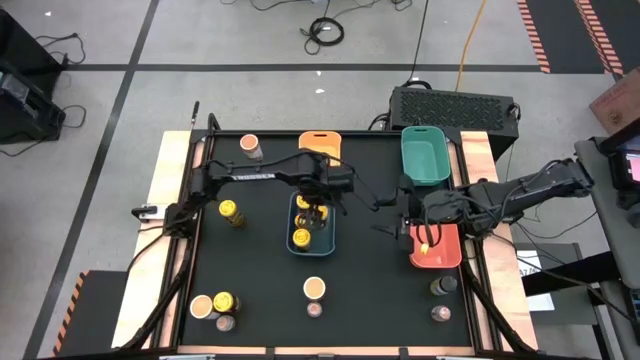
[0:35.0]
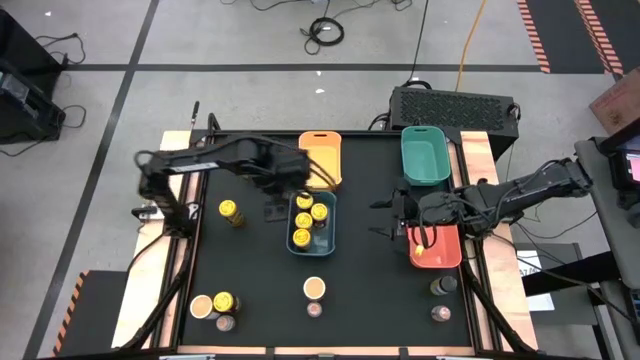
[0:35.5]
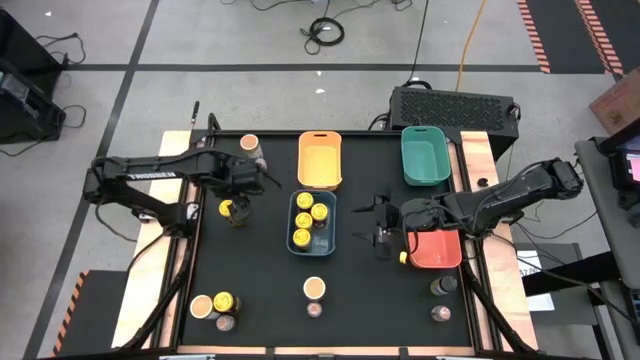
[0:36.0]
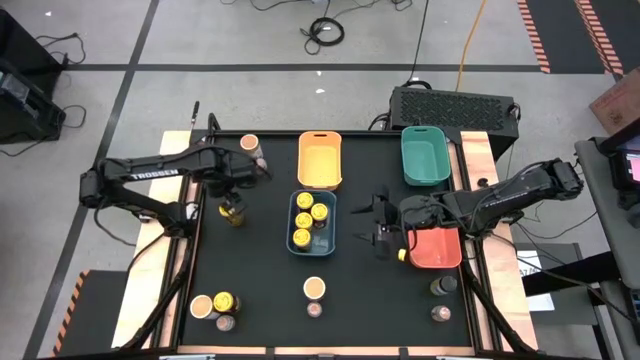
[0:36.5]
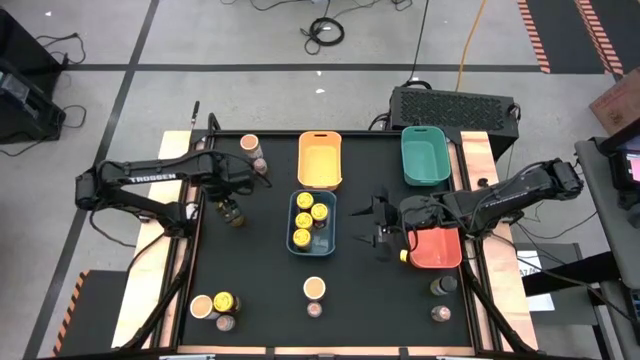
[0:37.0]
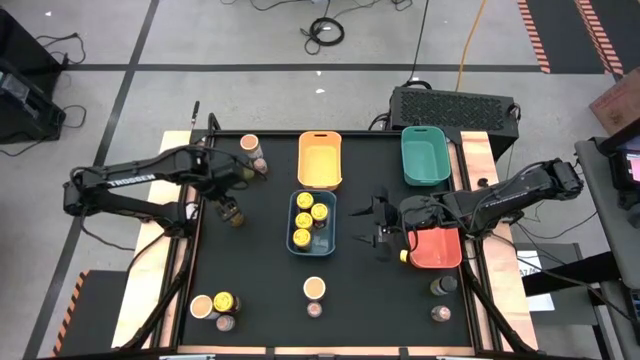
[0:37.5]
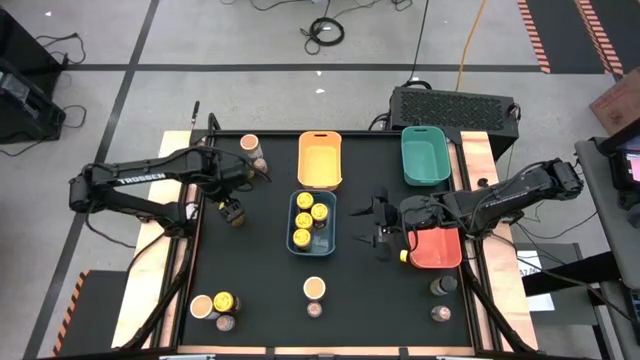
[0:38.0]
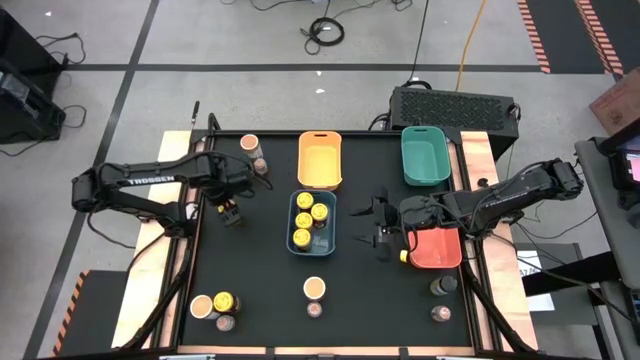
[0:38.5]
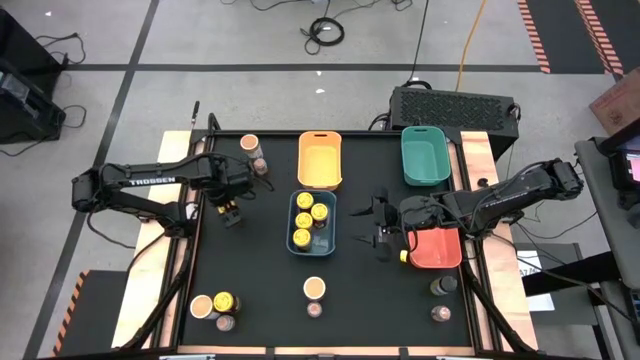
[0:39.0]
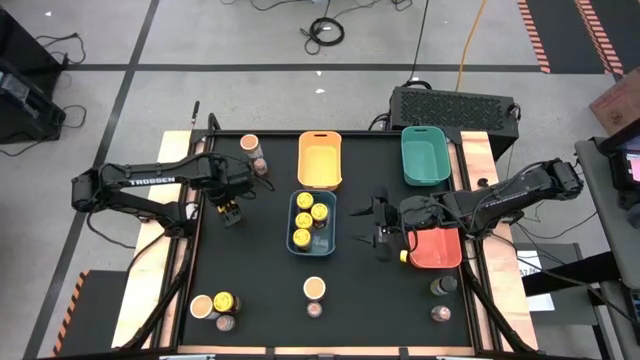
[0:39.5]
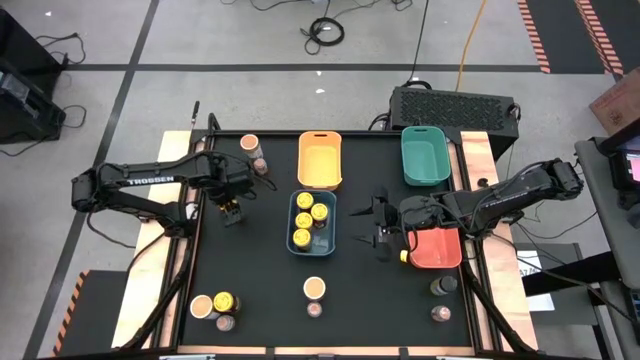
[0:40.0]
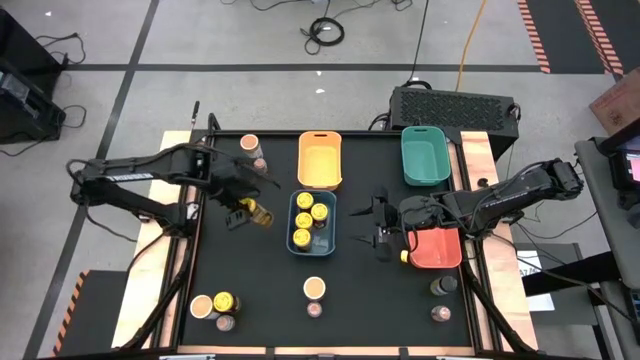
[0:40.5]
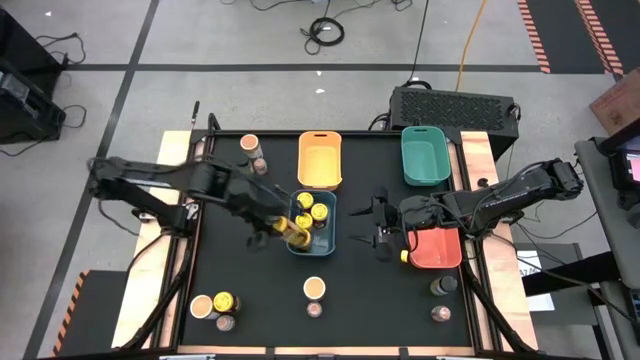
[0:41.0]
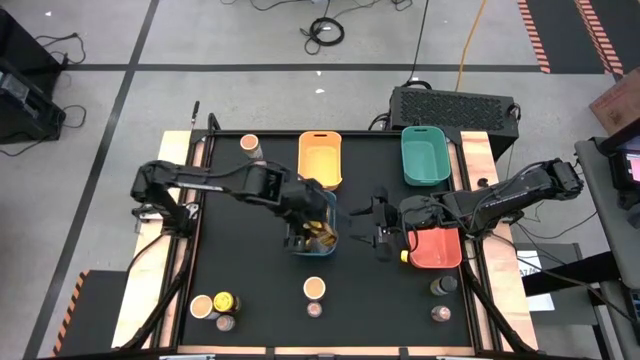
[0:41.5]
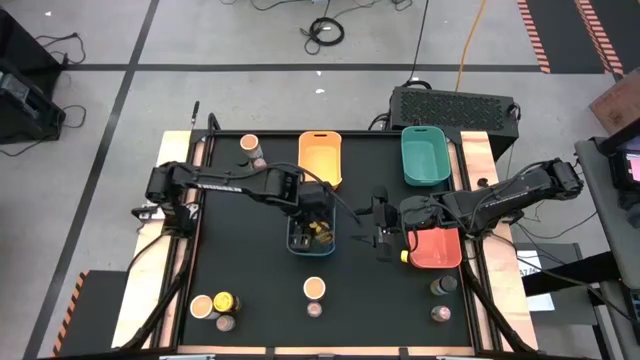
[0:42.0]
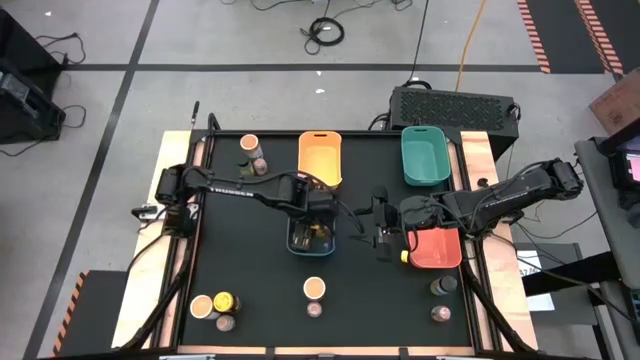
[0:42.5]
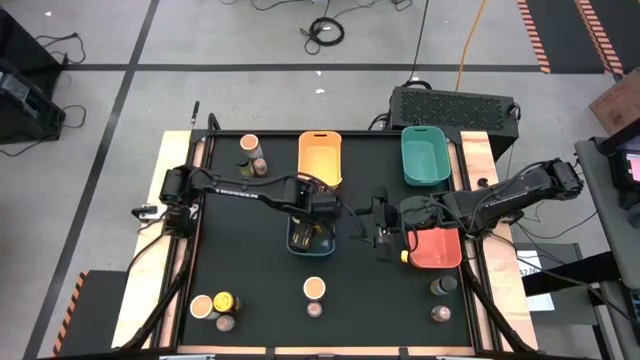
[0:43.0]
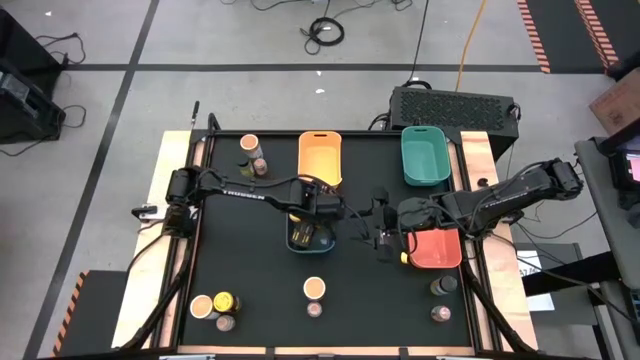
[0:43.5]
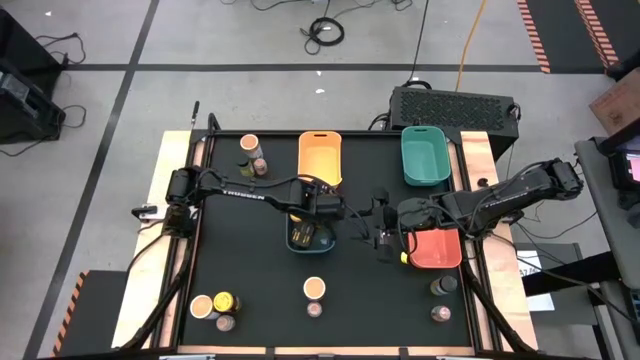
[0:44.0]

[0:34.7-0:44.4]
Task: Sort spices by type
Put the yellow seasoning bottle into the dark blue bin

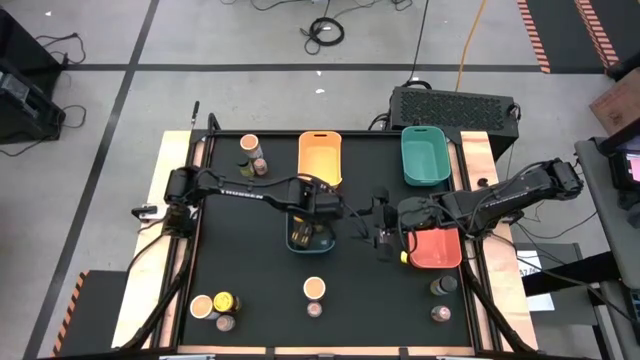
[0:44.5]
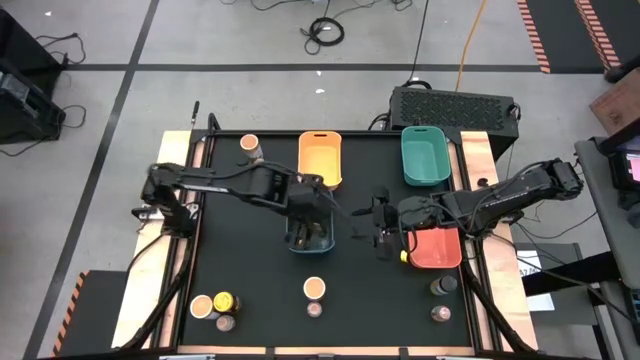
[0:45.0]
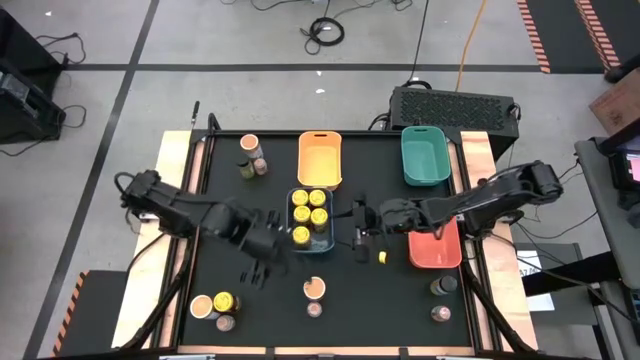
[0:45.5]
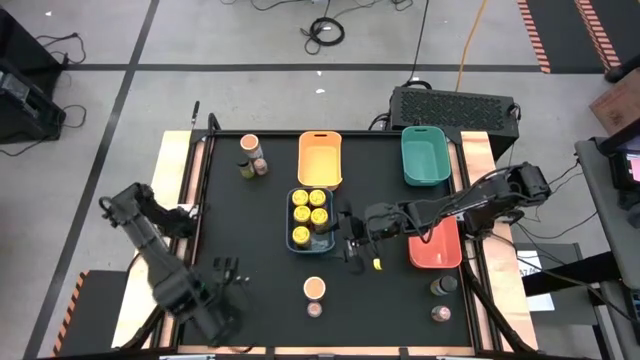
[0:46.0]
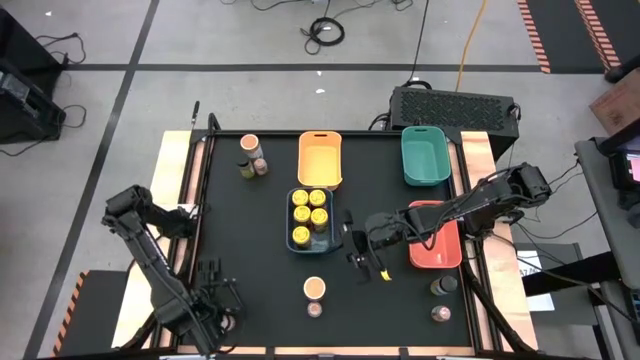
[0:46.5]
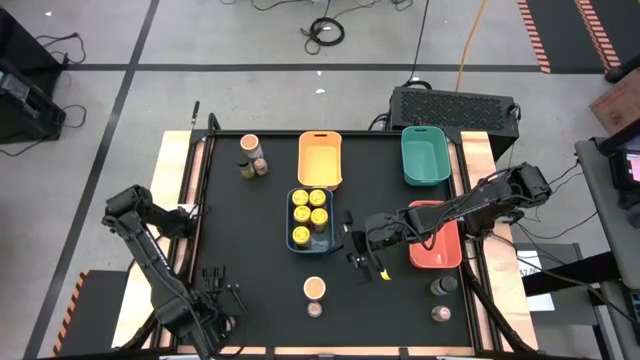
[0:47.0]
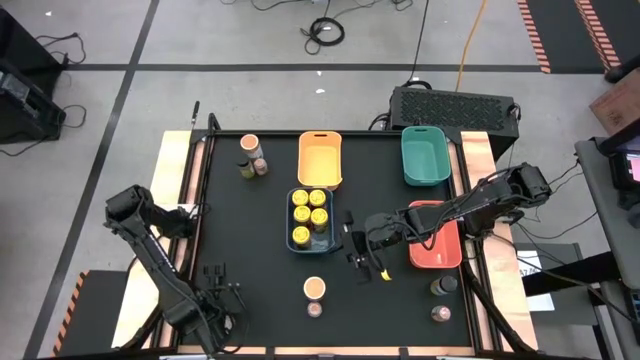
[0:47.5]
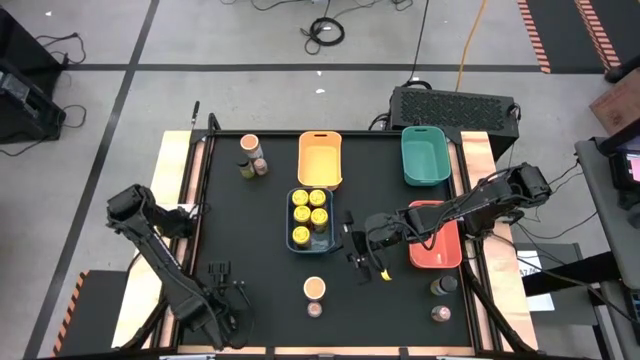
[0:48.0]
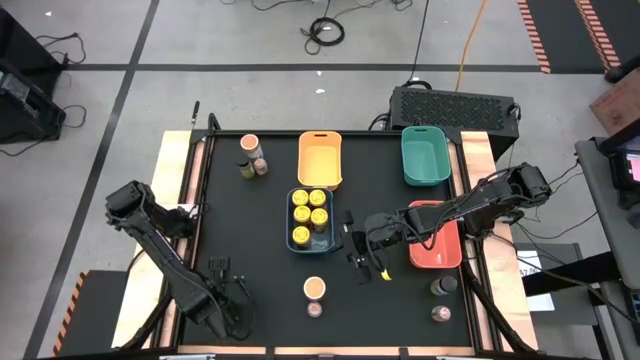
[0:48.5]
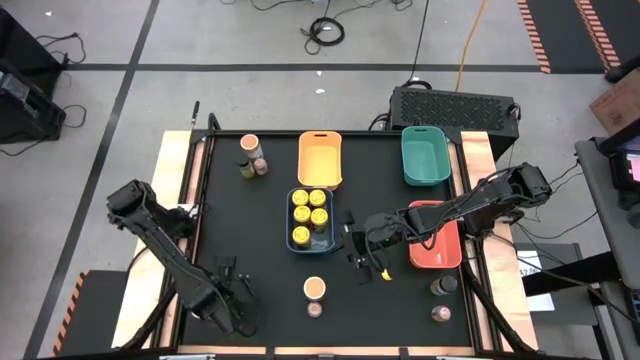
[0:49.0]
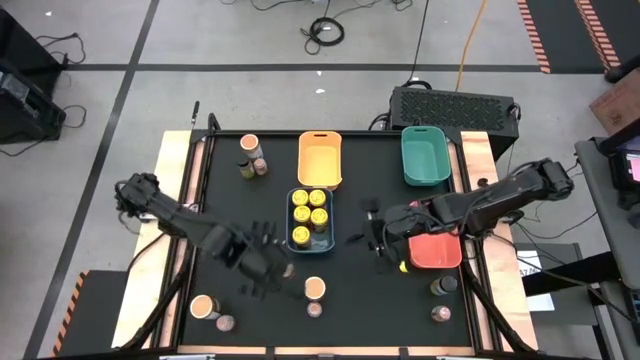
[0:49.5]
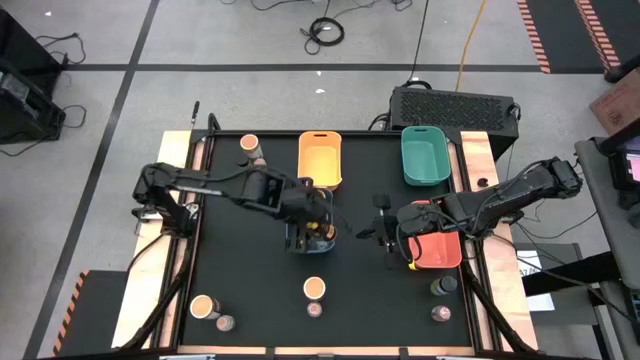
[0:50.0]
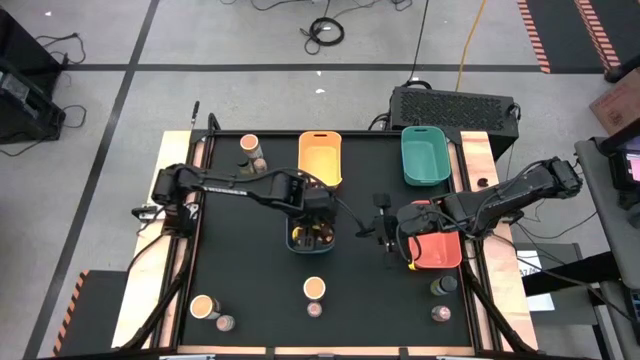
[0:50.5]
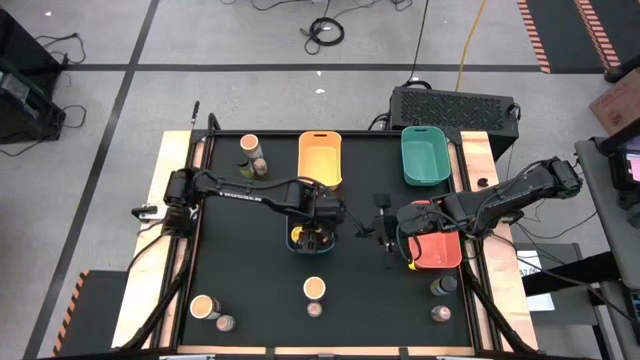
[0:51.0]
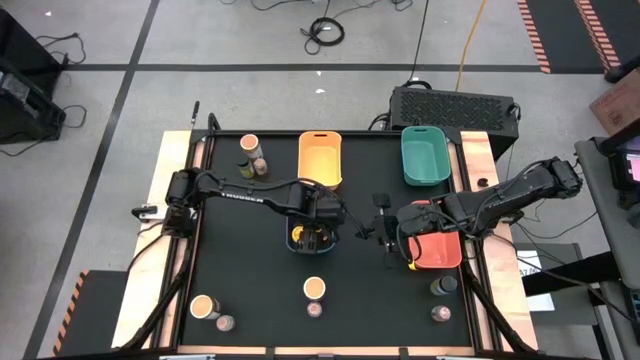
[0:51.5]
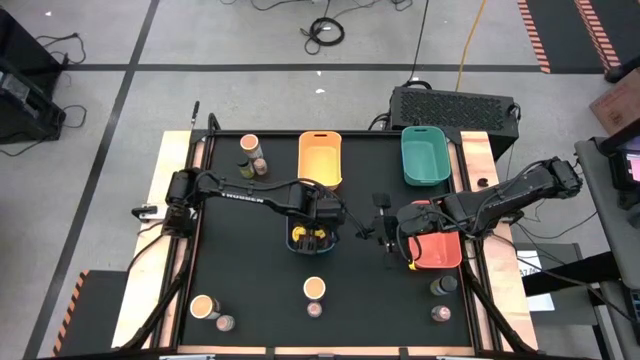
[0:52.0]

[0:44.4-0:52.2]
Put the yellow seasoning bottle into the dark blue bin

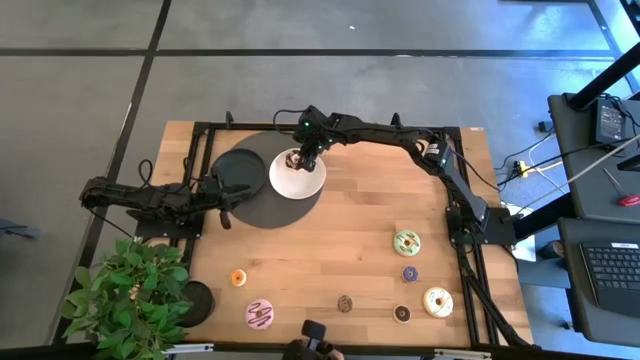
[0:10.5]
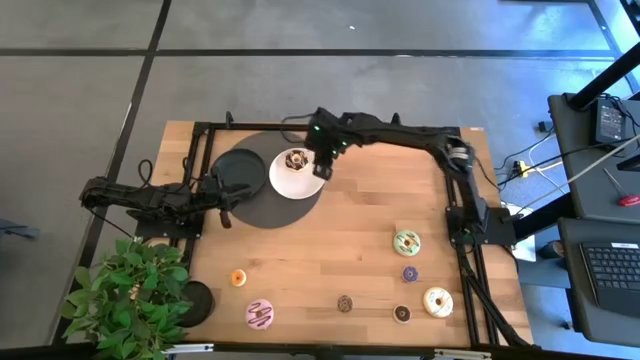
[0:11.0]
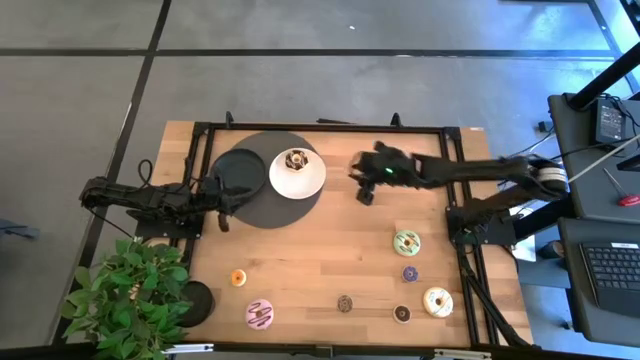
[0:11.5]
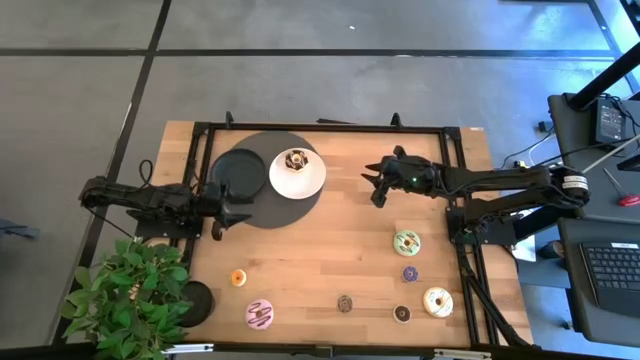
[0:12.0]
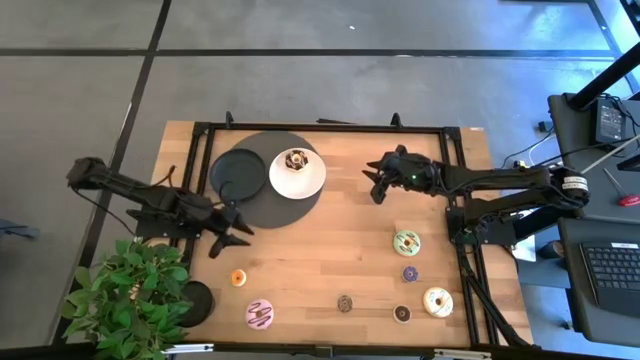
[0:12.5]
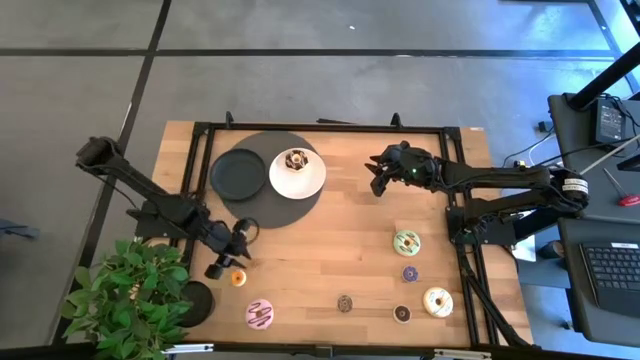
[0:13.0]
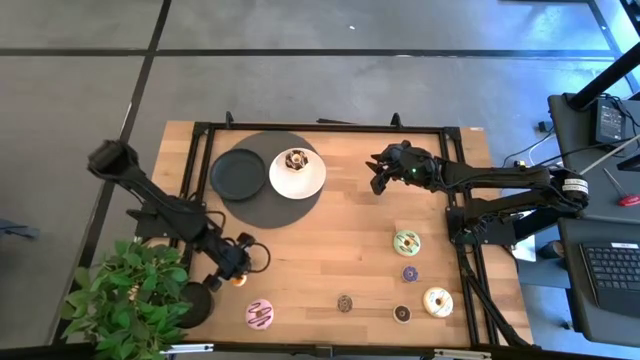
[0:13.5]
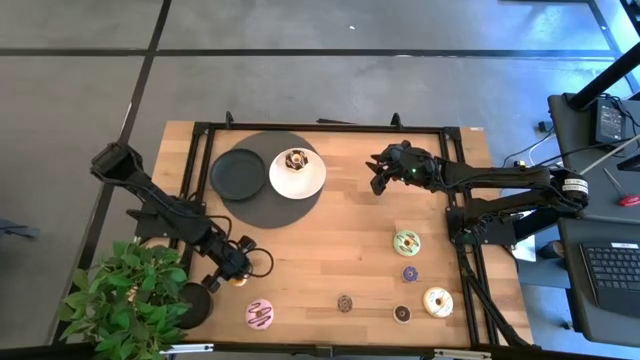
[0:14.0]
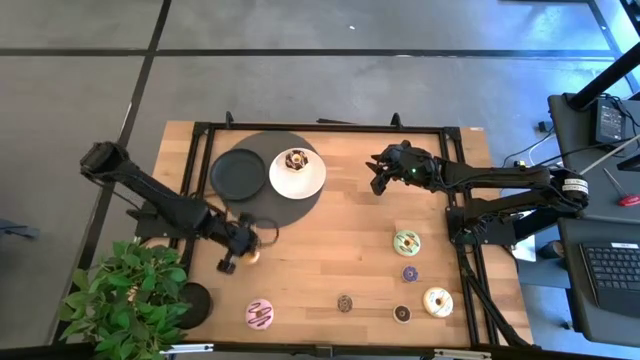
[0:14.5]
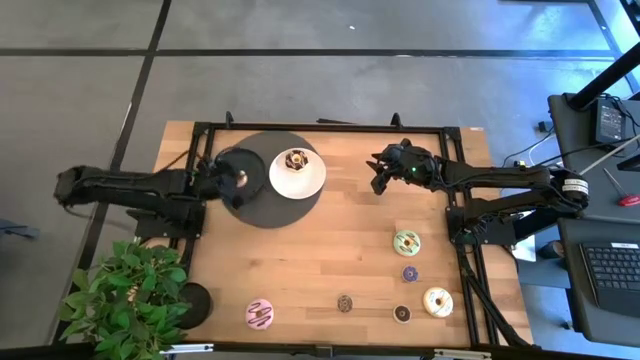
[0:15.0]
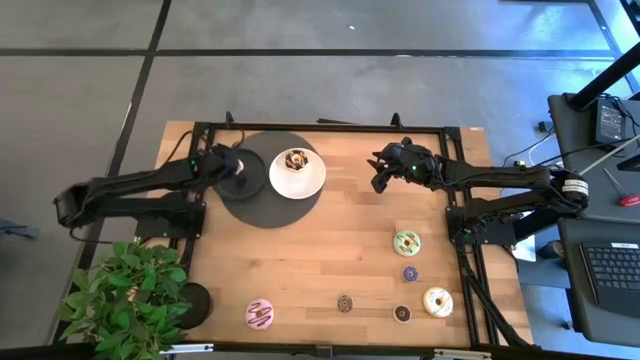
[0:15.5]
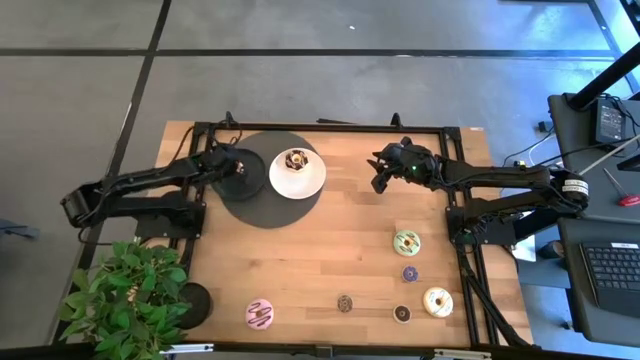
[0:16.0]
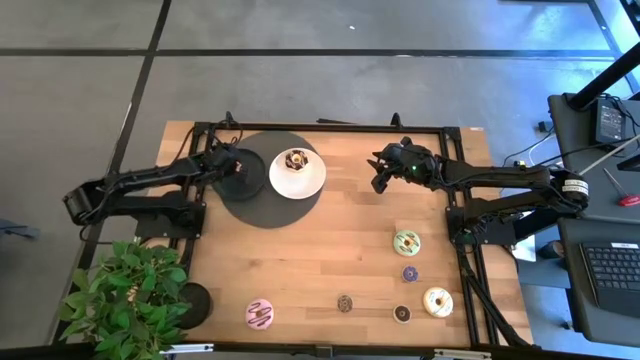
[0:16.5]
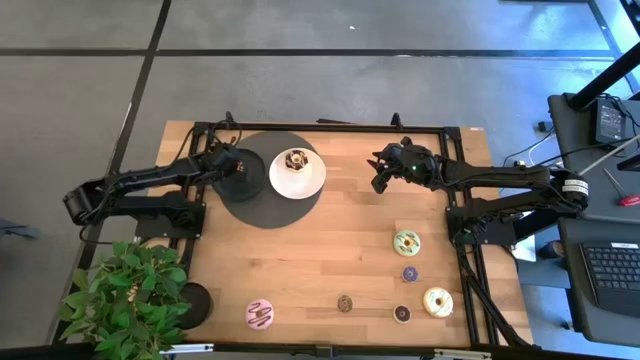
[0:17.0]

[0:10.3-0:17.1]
Task: Pick & Place donuts
Put the small orange donut on the black plate
